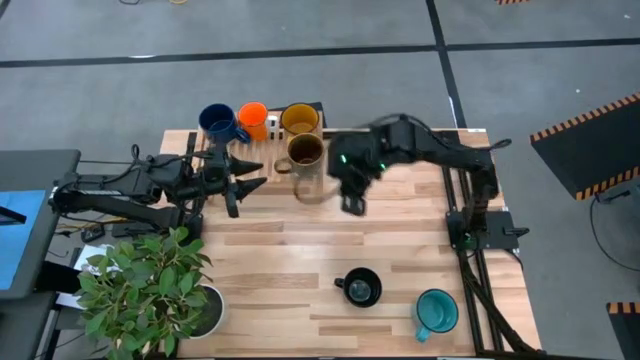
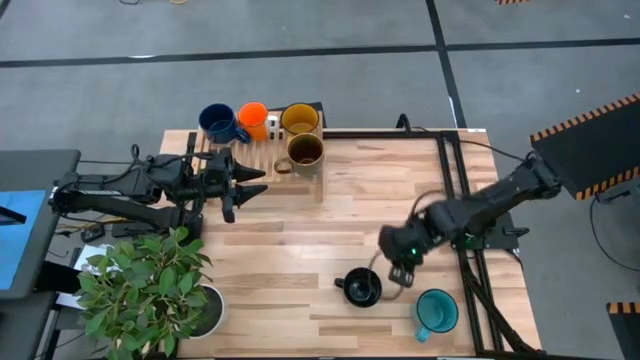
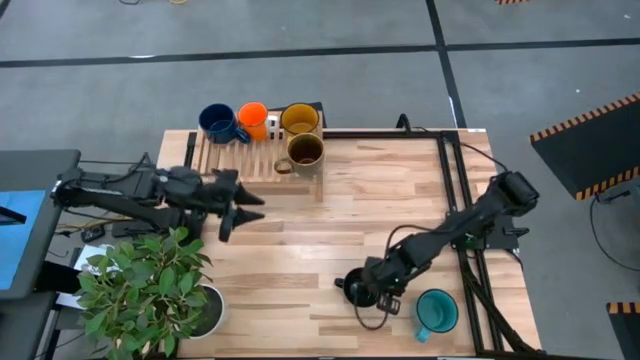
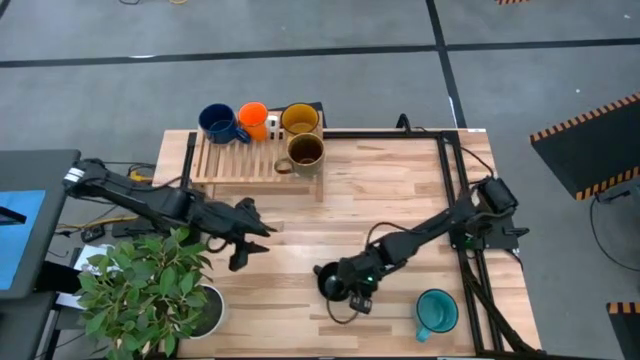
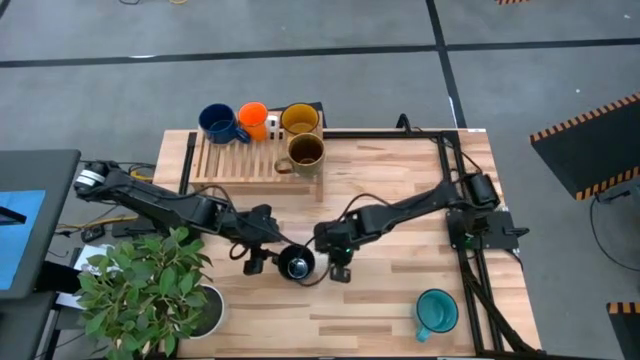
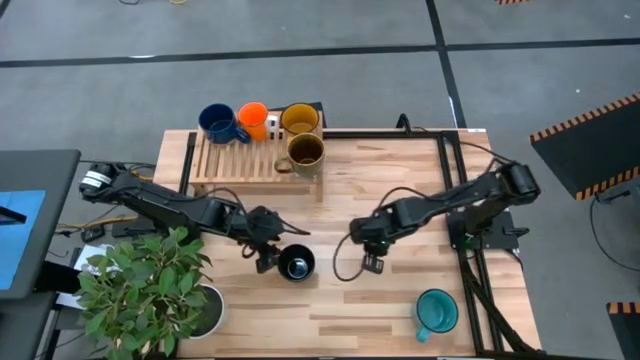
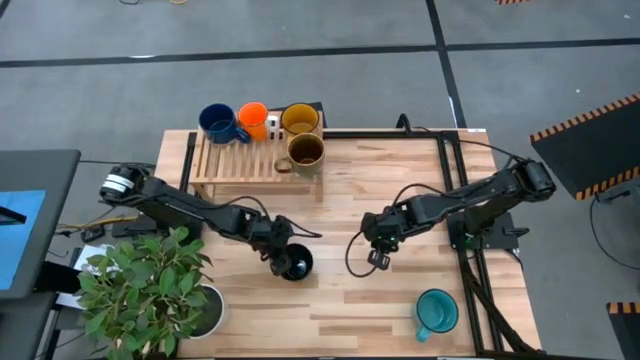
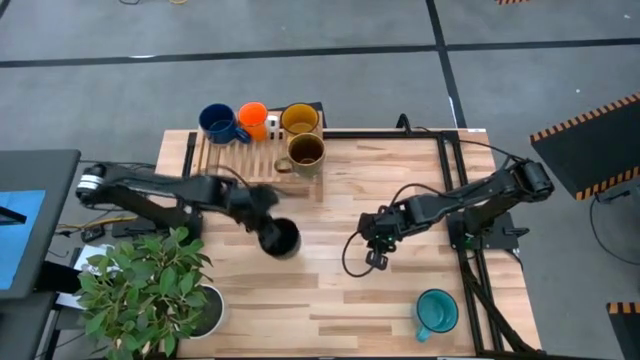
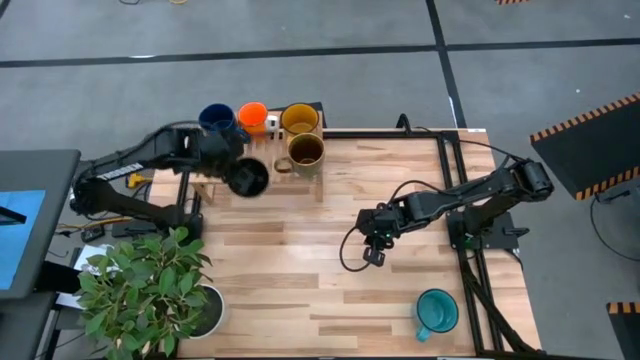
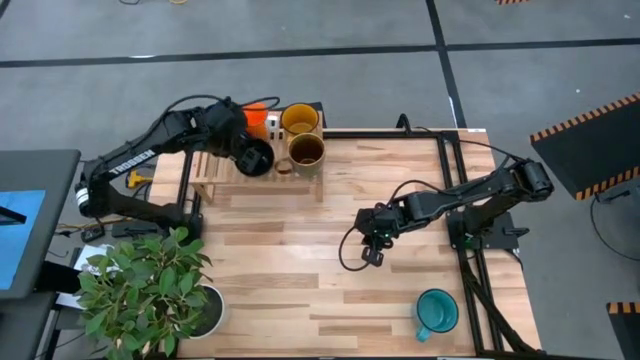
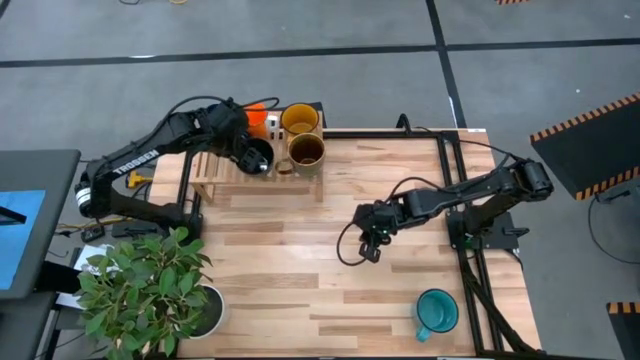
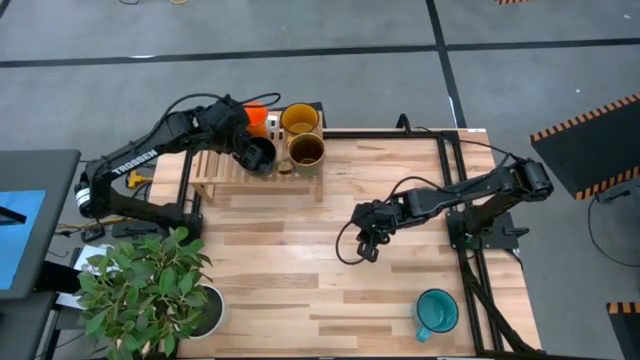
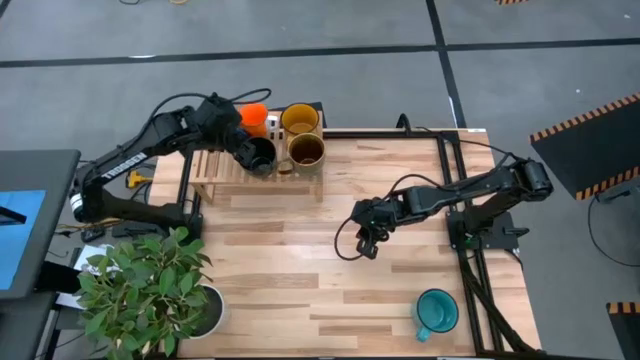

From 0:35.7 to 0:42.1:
Task: Place coffee mugs
Put the black mug on the shelf

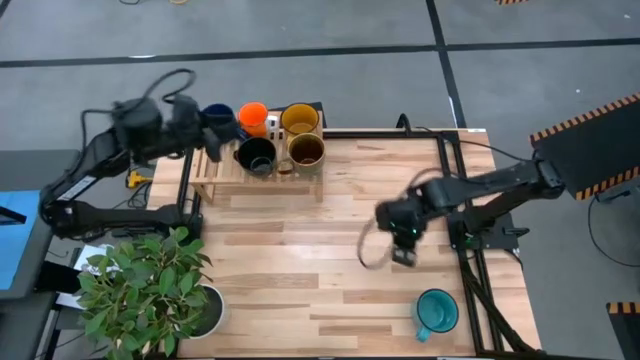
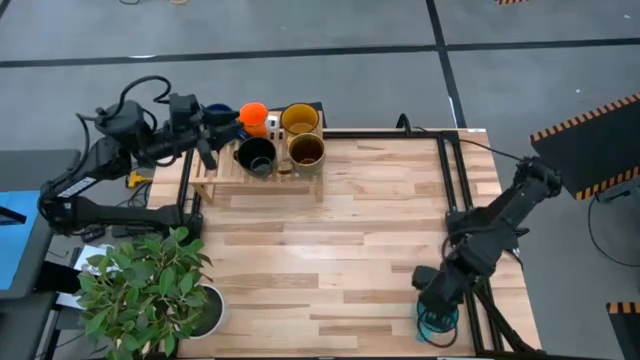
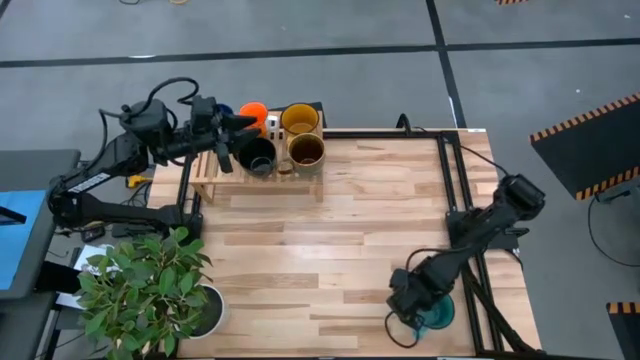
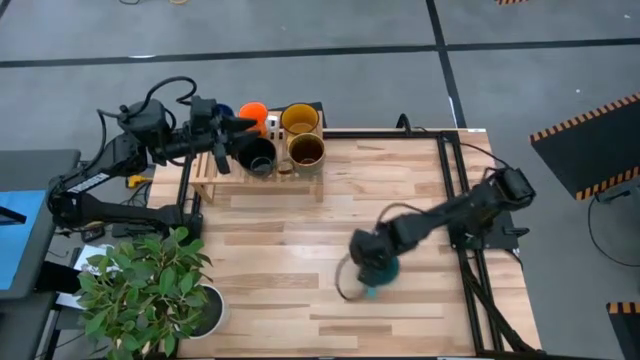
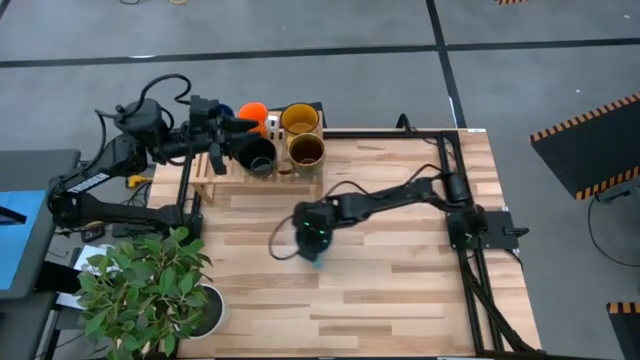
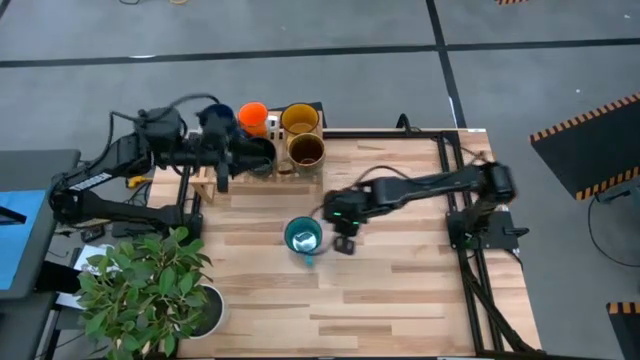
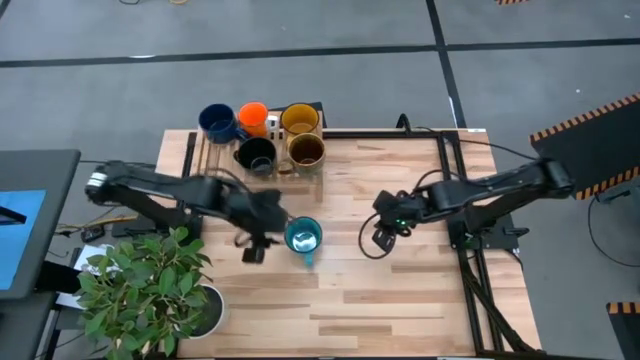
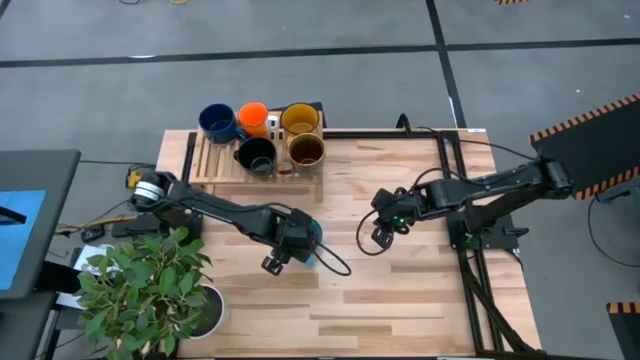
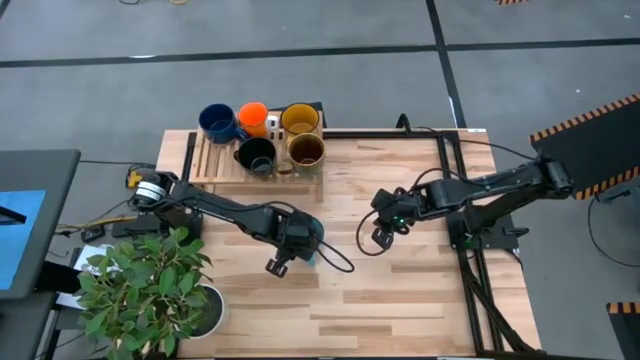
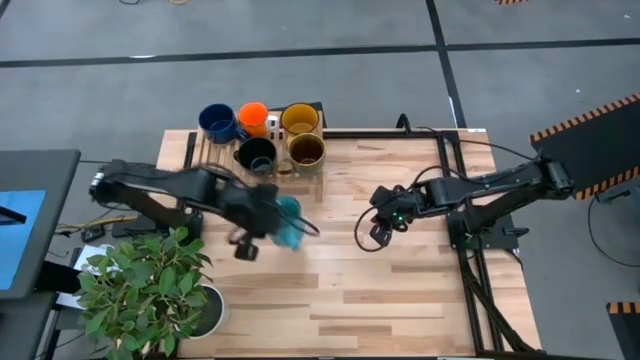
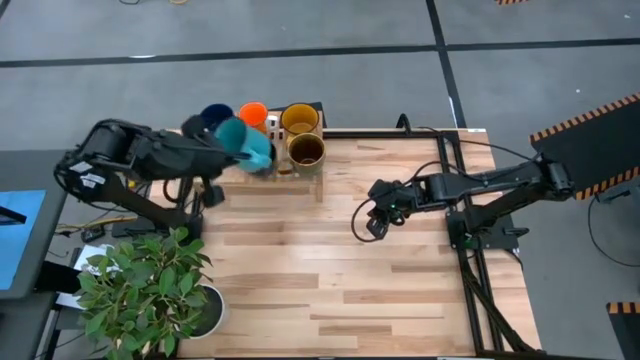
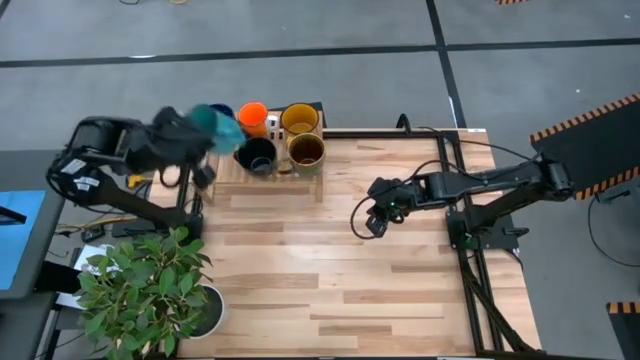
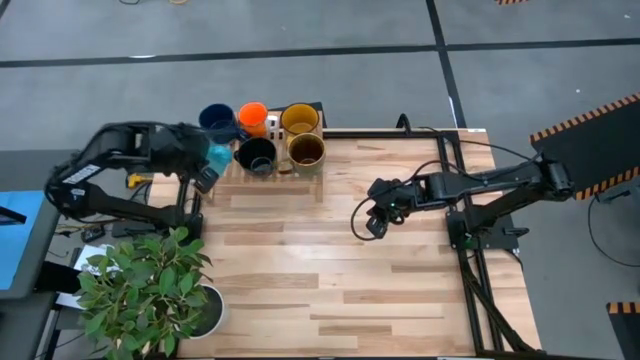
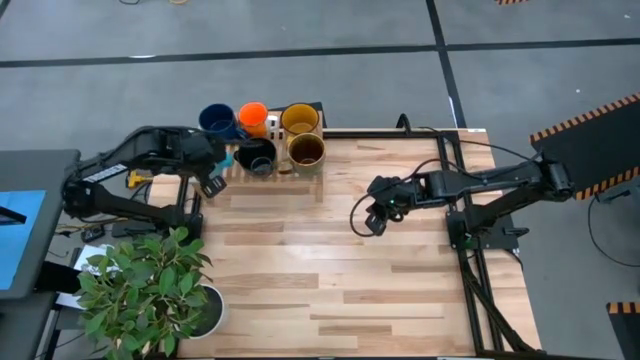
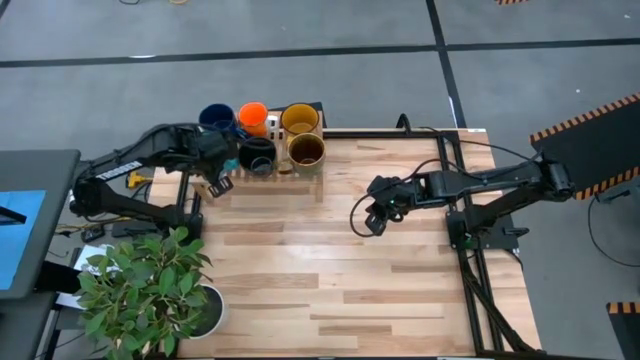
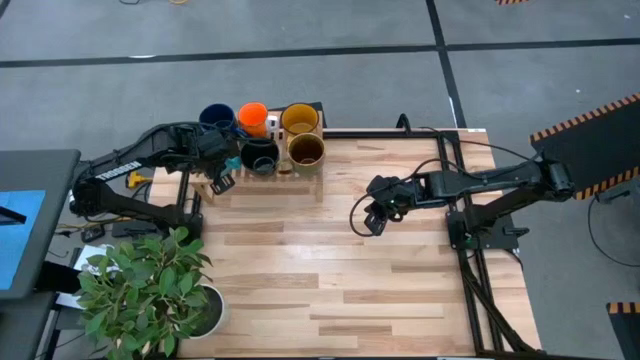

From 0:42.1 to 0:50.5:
Put the light blue mug on the shelf

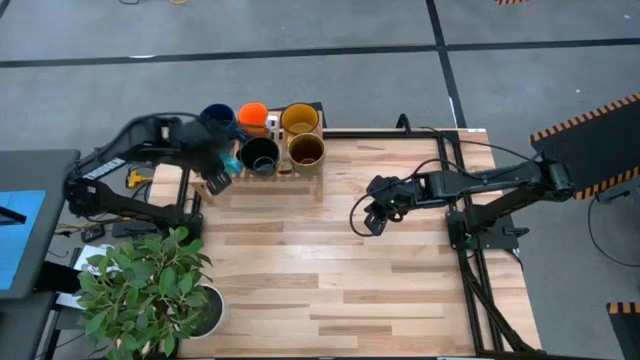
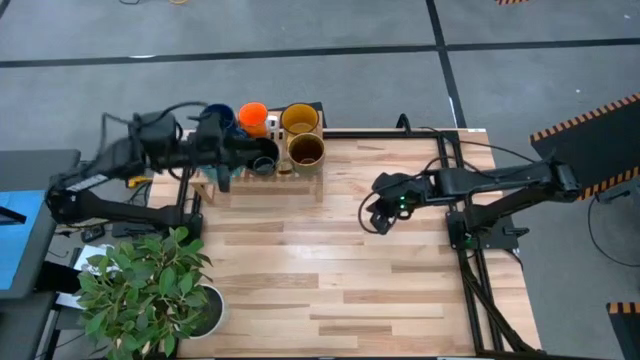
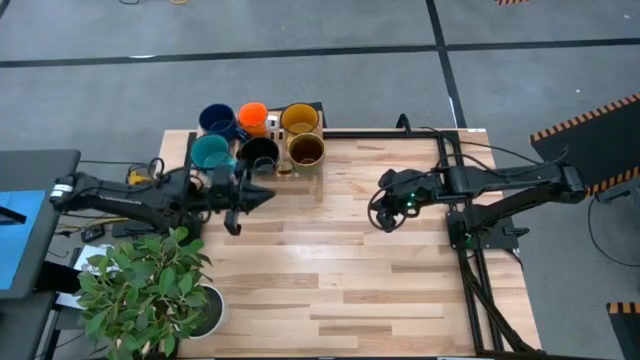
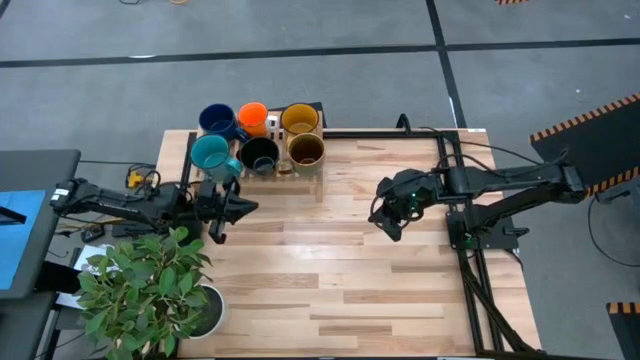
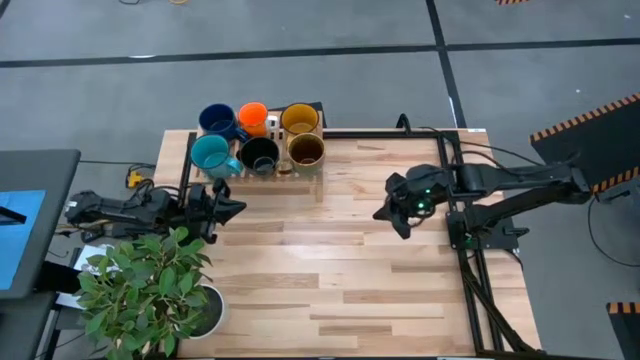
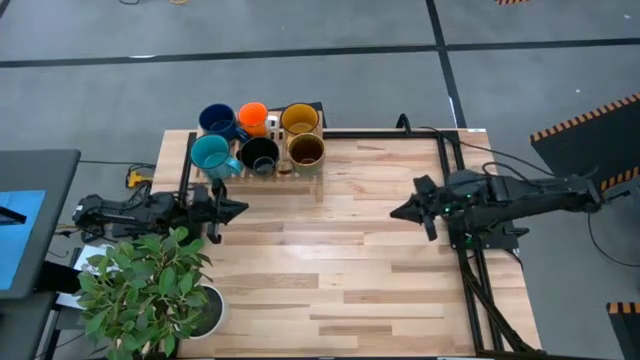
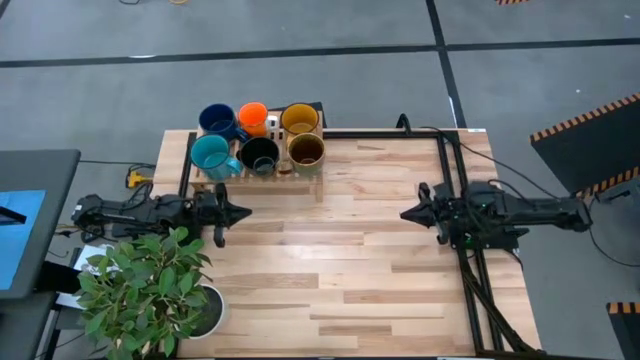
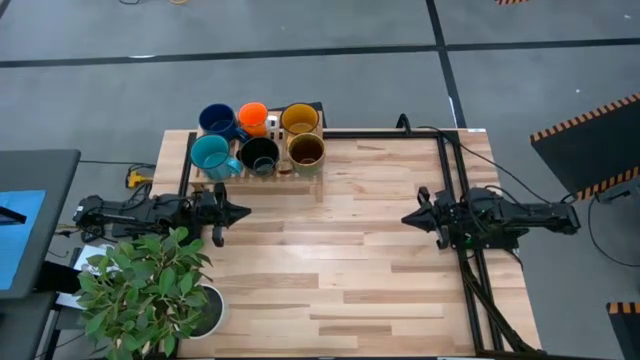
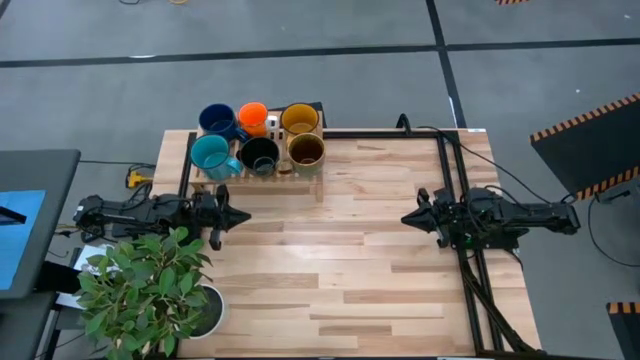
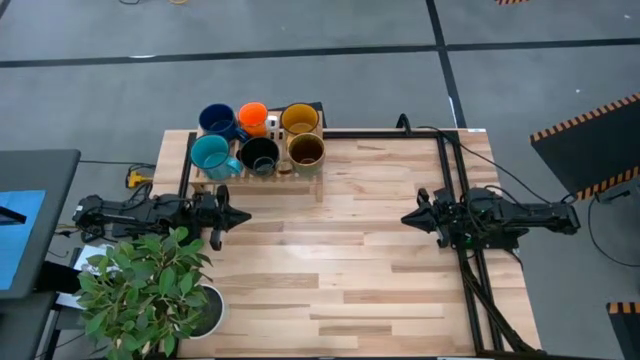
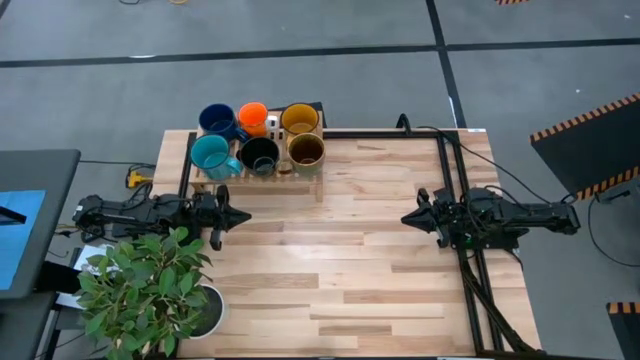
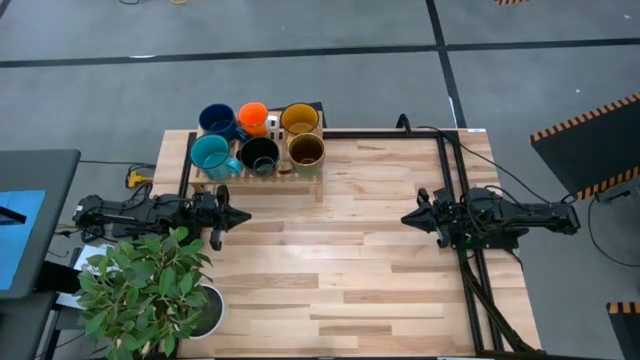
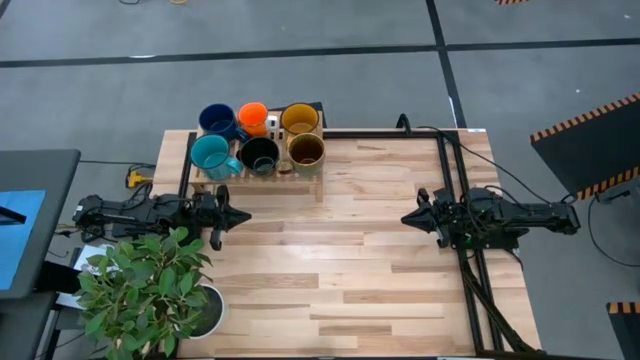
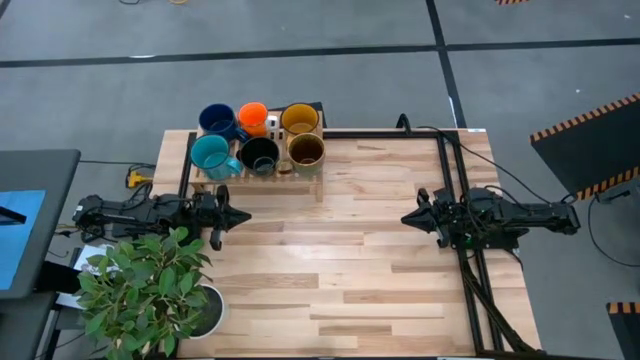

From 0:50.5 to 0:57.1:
Return to Home Position
